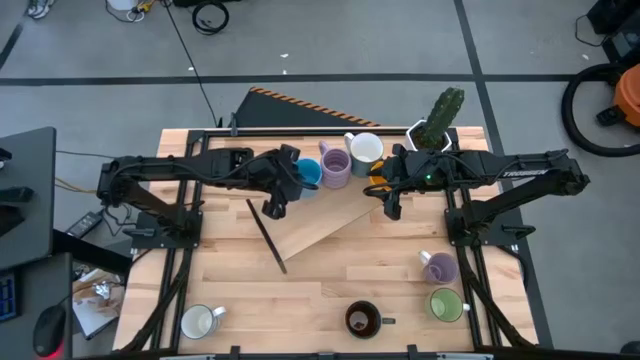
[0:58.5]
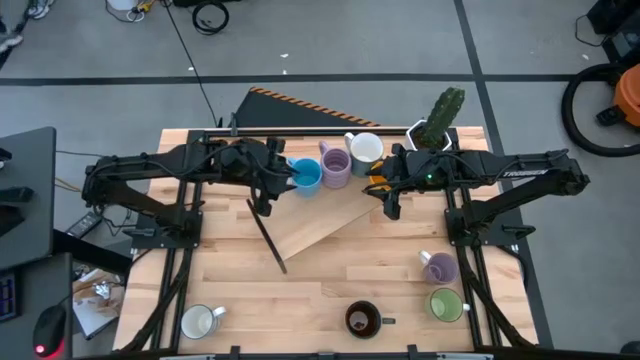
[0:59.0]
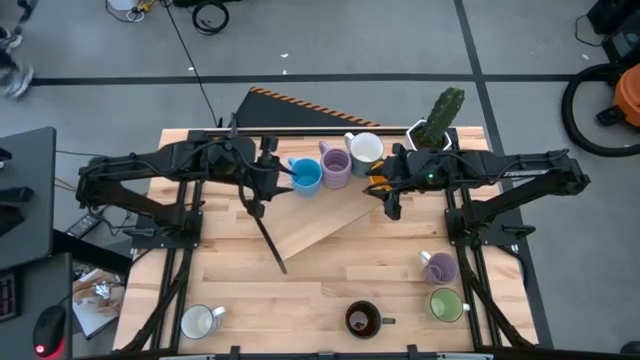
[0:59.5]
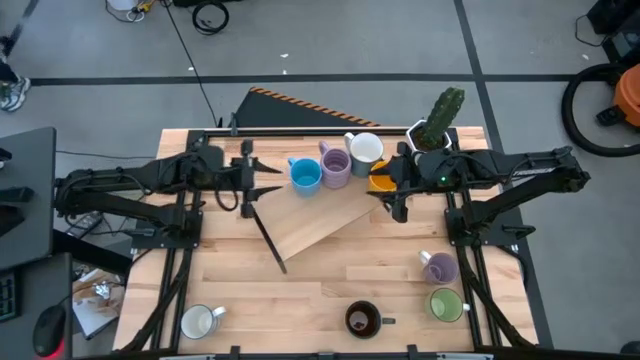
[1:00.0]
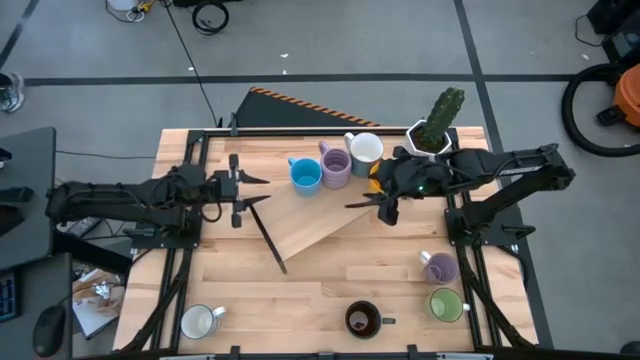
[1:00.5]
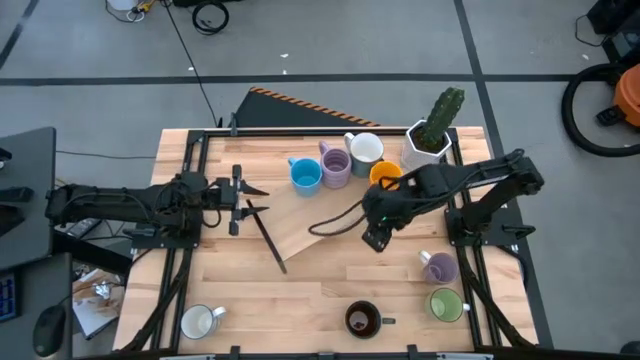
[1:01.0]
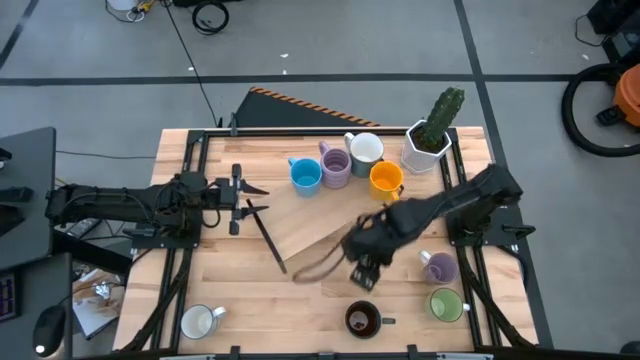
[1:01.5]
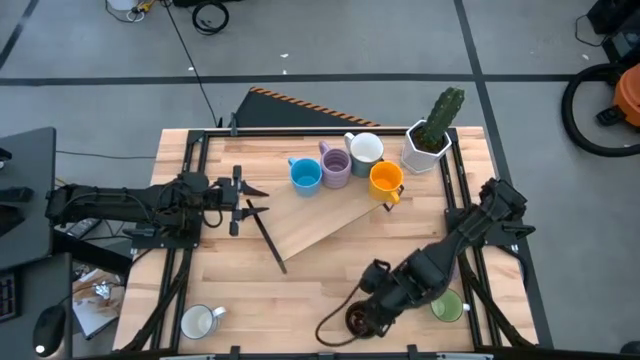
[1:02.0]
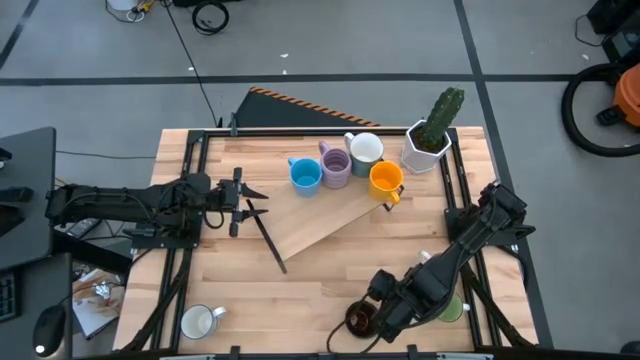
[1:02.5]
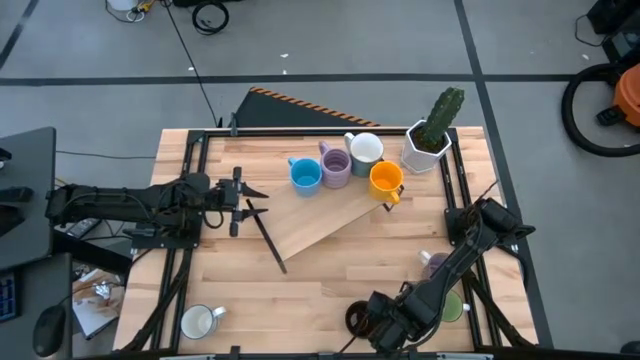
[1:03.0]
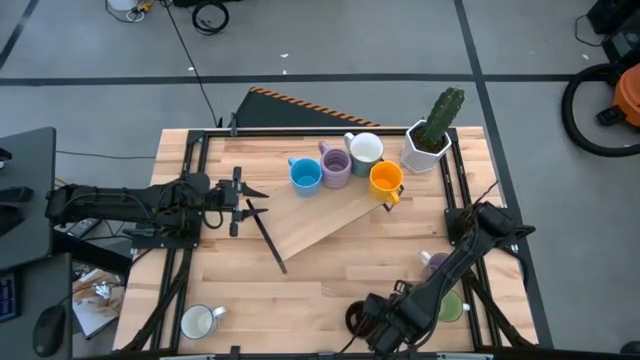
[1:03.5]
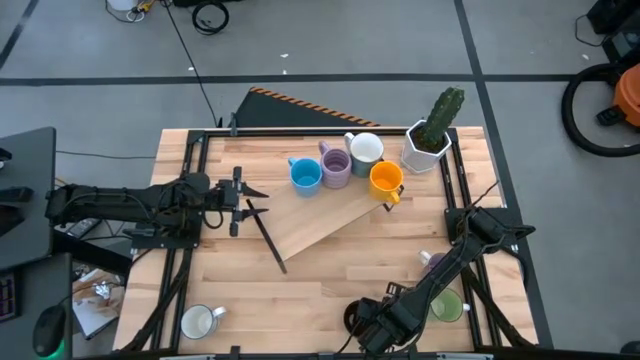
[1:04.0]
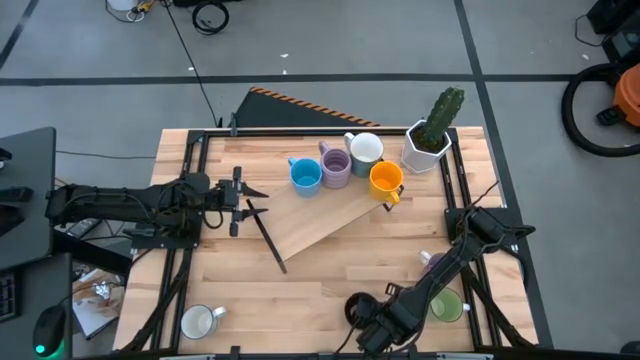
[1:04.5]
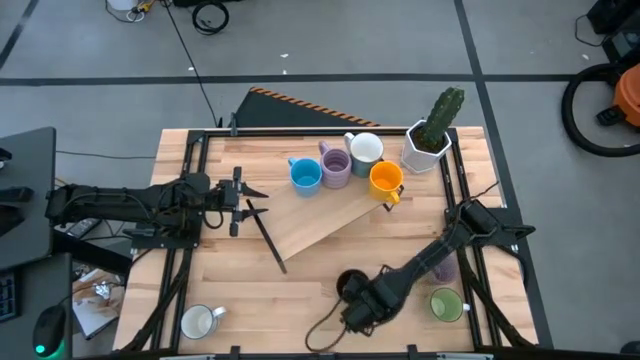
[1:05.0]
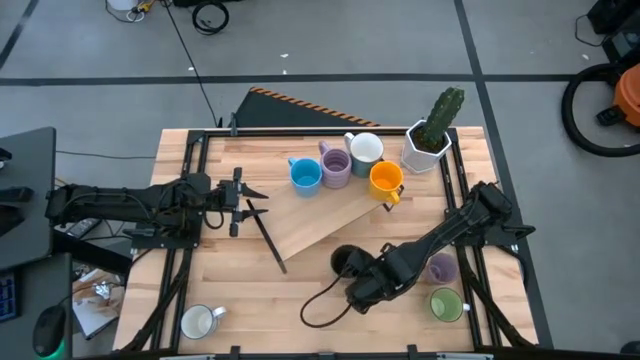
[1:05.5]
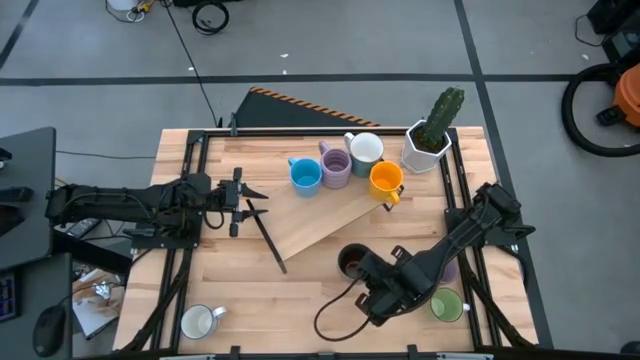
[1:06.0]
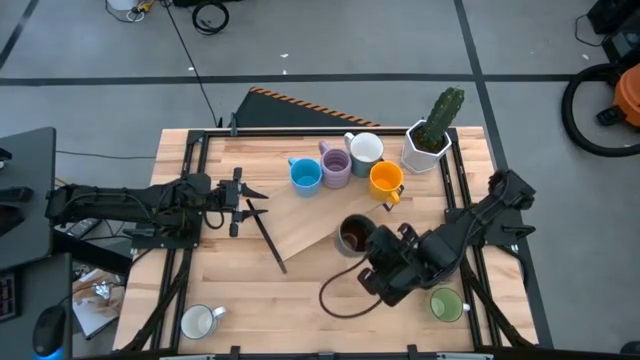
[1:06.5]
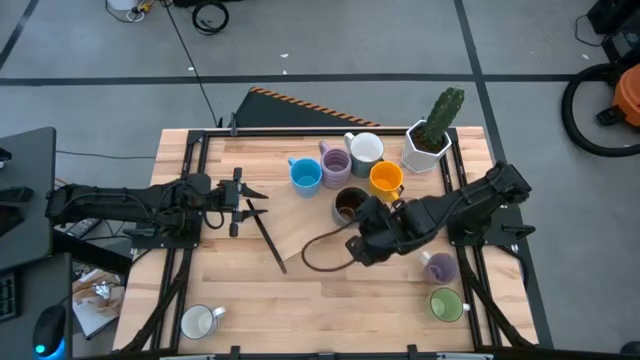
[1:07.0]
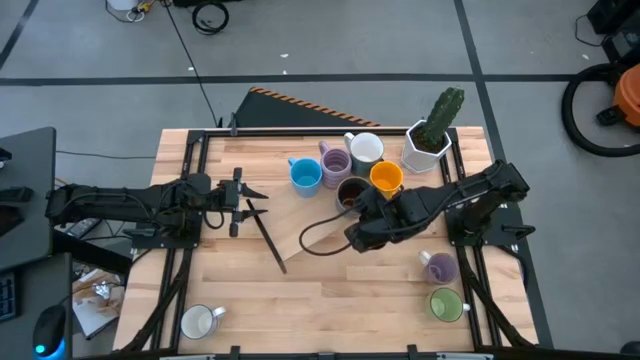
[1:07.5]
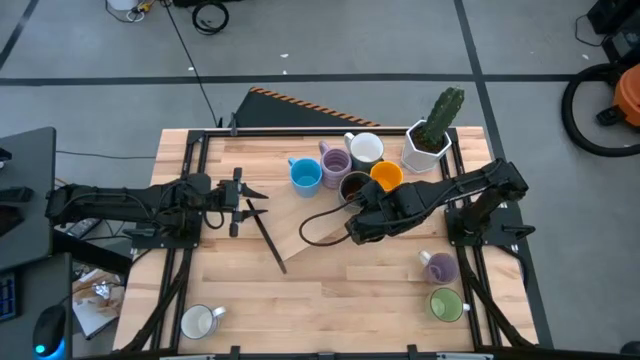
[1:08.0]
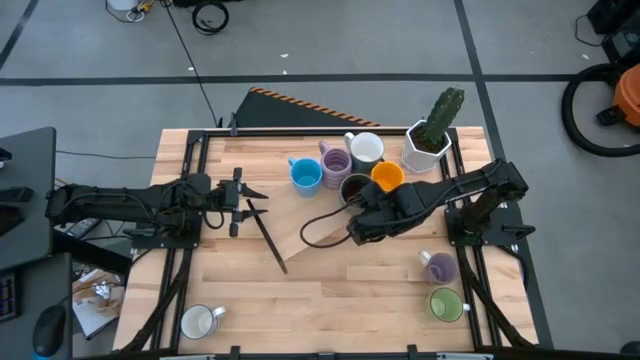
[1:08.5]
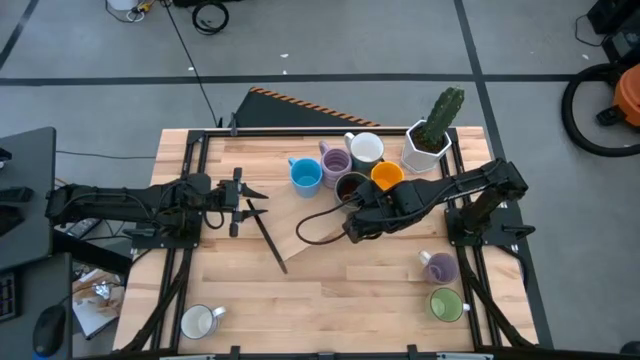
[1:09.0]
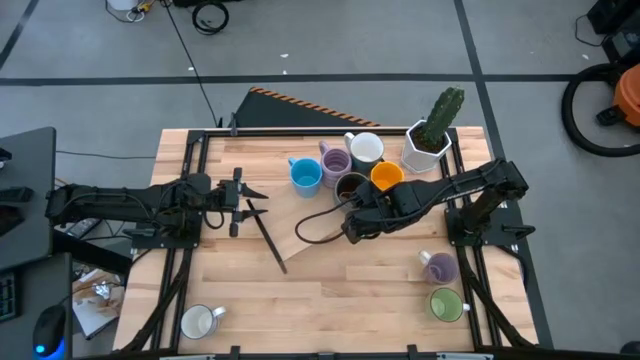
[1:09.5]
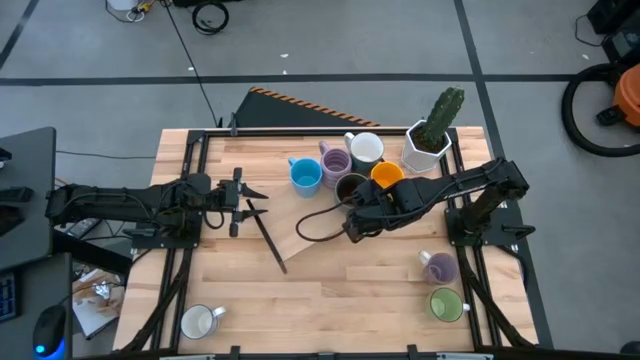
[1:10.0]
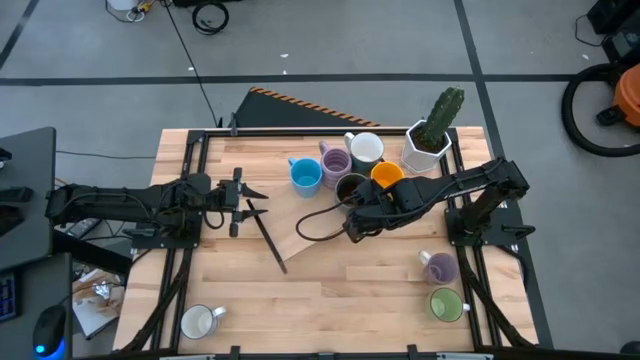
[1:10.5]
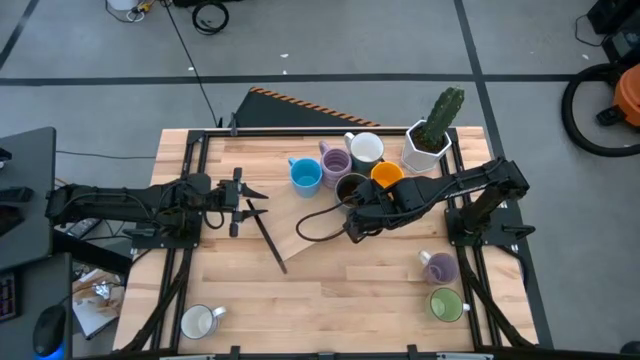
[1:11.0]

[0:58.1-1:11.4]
Task: Place coffee mugs
Put the blue patterned mug on the shelf

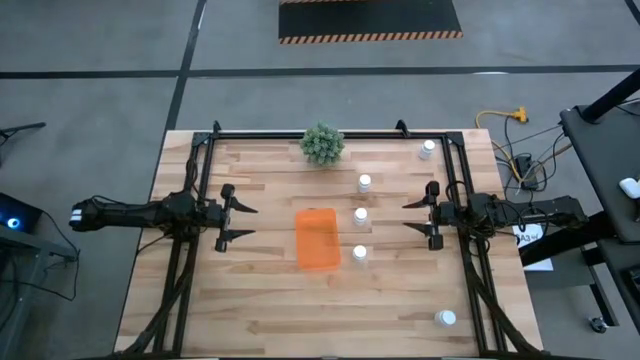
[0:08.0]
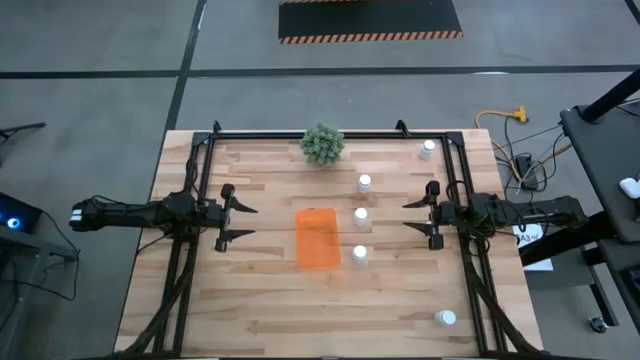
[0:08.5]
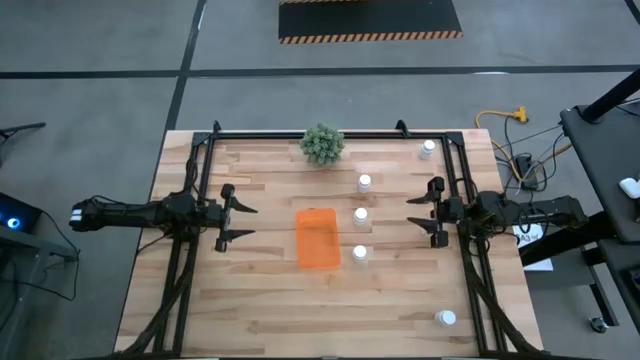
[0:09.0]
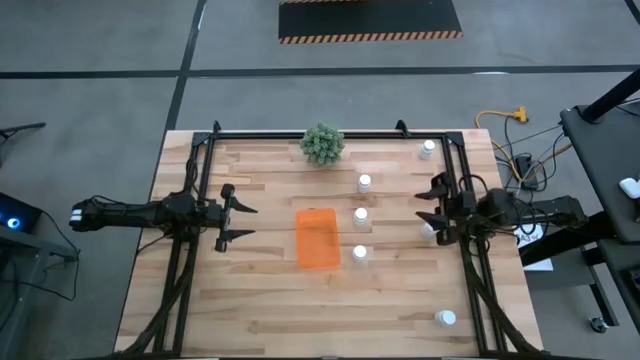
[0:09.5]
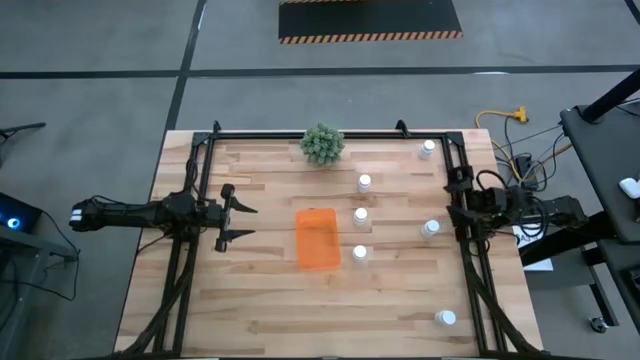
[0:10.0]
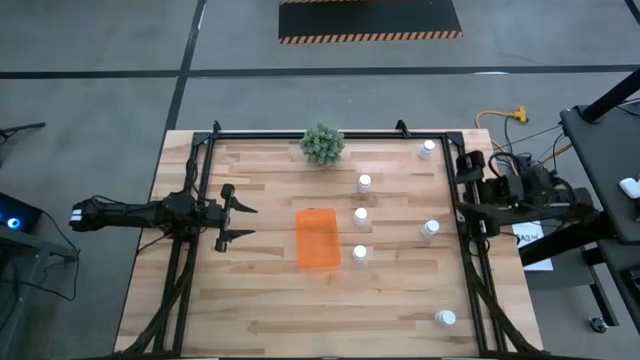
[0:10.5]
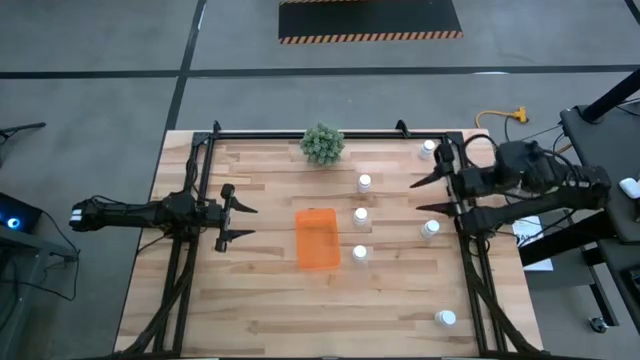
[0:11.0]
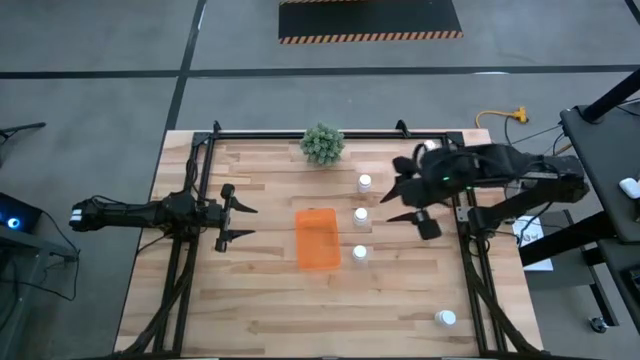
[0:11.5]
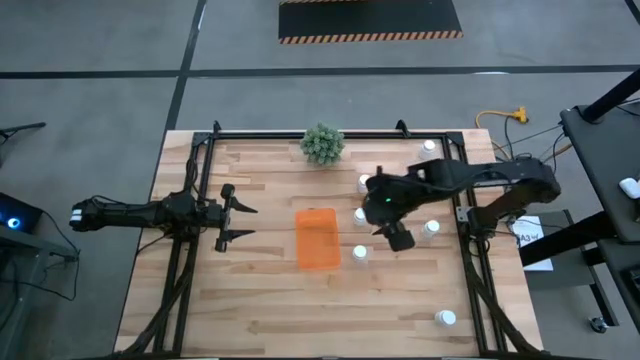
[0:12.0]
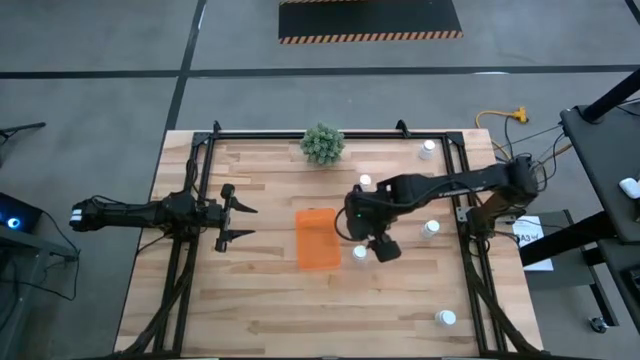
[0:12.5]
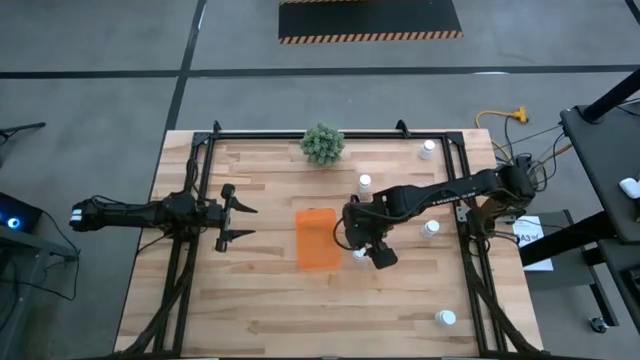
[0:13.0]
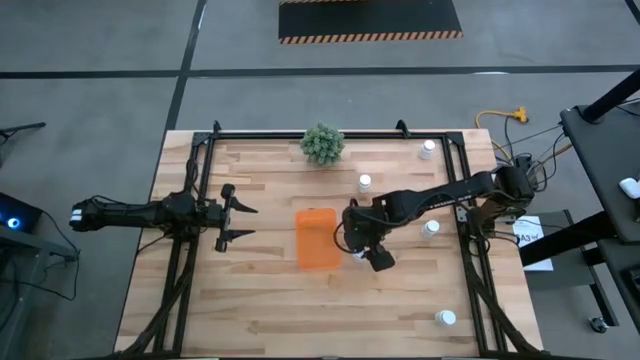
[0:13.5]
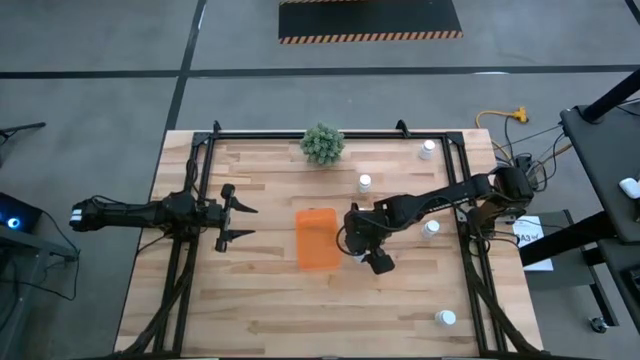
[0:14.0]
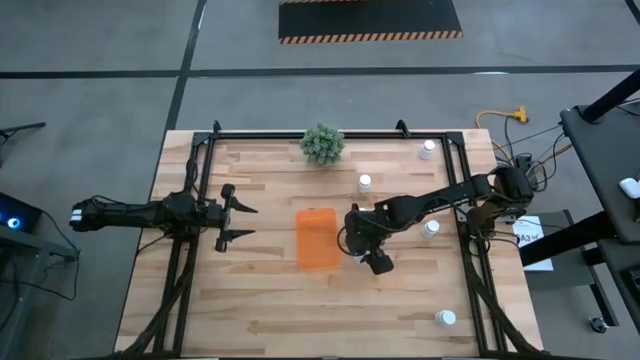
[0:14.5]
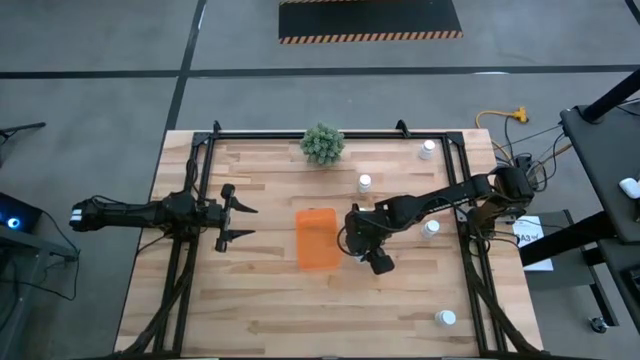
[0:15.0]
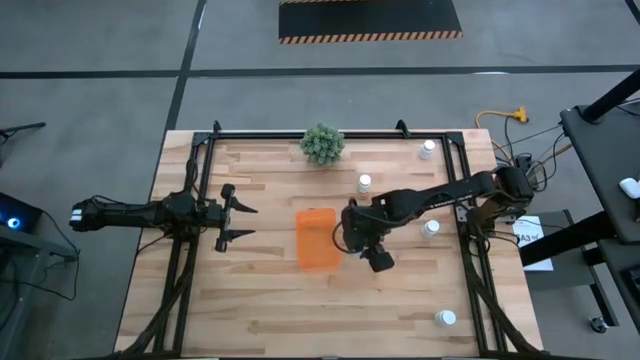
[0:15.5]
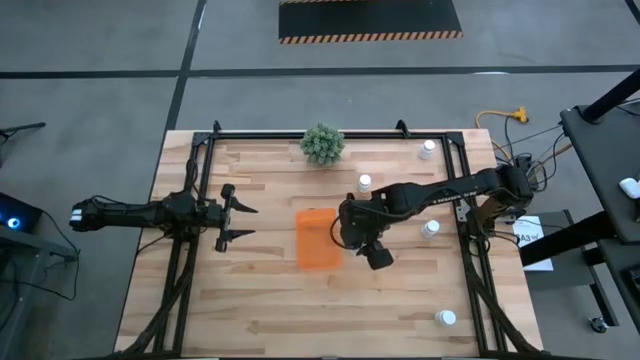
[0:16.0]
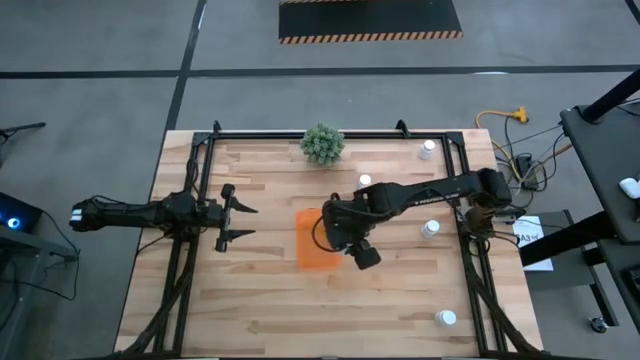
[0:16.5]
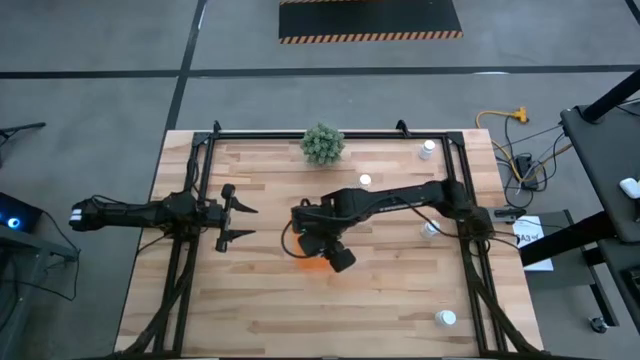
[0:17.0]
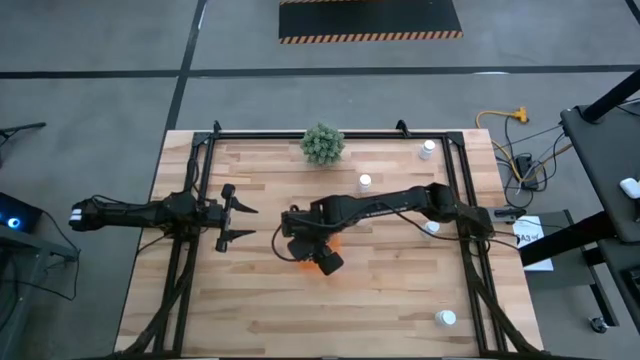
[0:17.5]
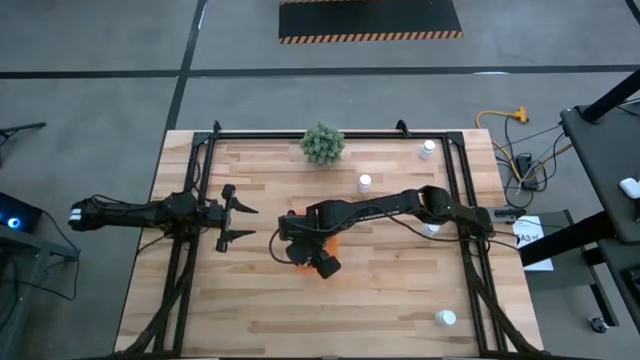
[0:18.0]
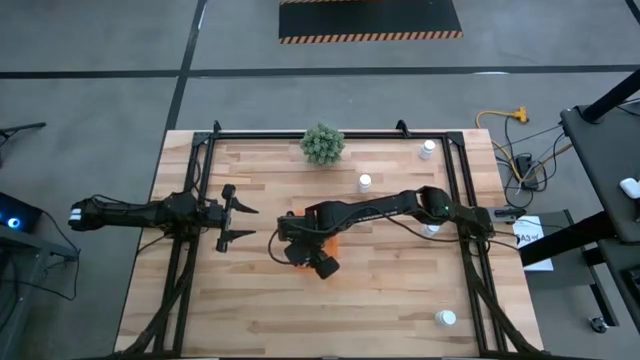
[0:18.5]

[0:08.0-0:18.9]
Task: Pick and place pill bottles into a basket
Put the white pill bottle into the orange bin
